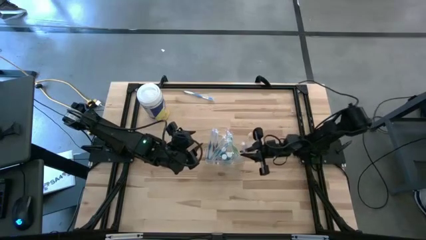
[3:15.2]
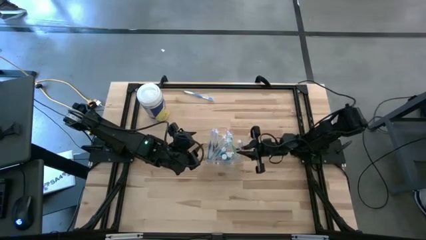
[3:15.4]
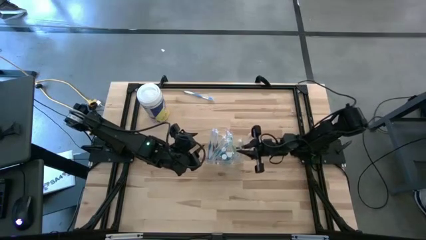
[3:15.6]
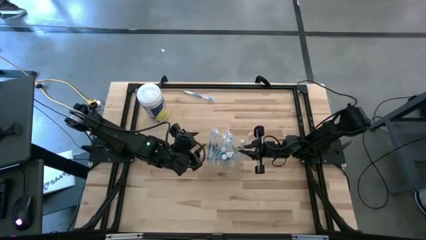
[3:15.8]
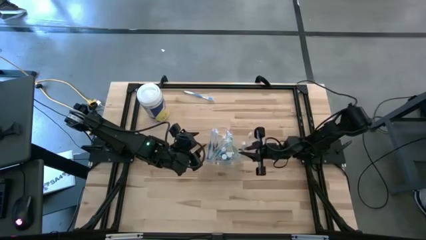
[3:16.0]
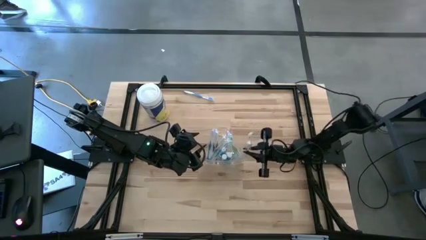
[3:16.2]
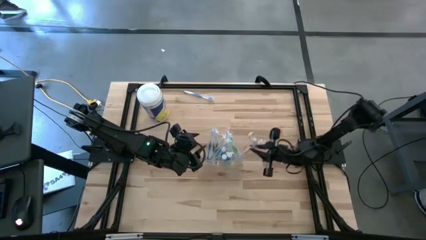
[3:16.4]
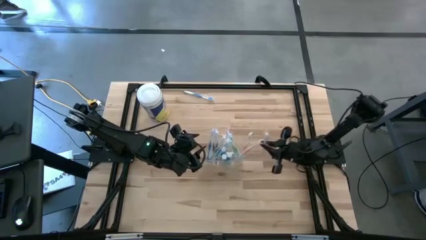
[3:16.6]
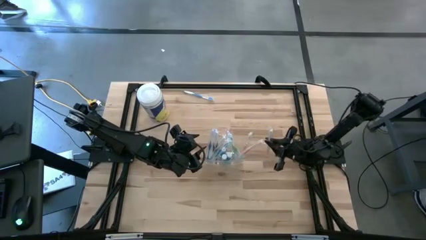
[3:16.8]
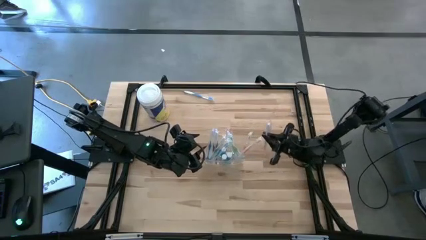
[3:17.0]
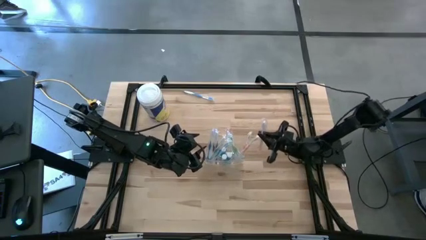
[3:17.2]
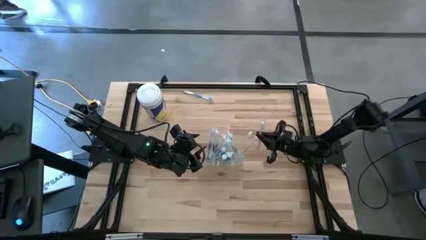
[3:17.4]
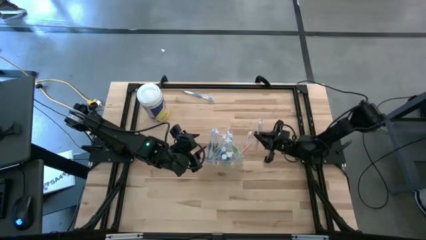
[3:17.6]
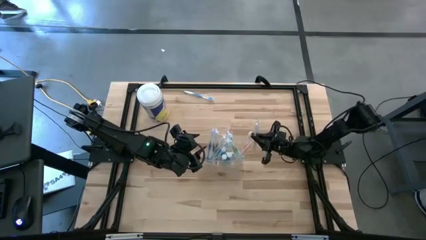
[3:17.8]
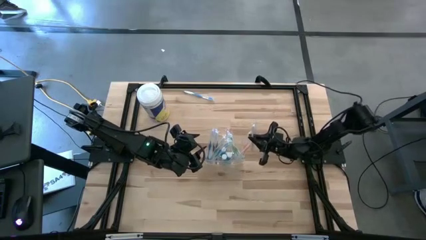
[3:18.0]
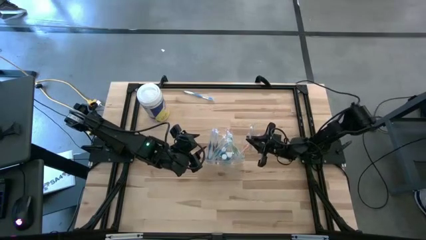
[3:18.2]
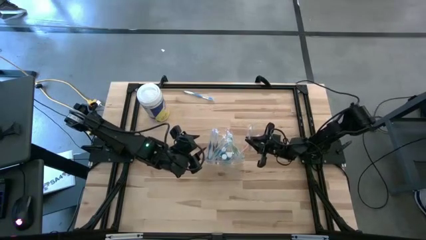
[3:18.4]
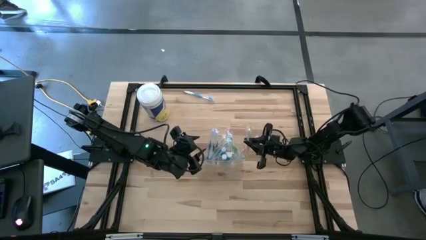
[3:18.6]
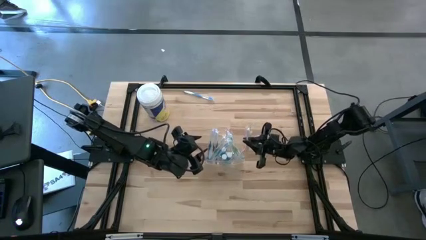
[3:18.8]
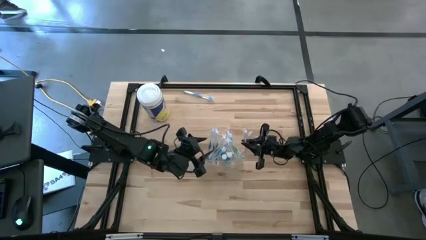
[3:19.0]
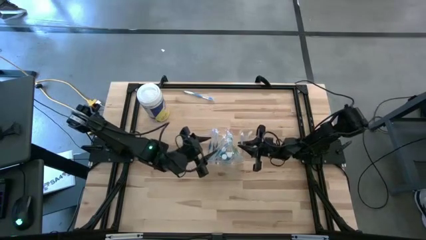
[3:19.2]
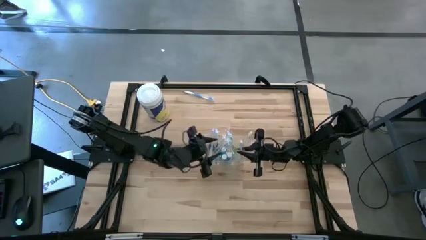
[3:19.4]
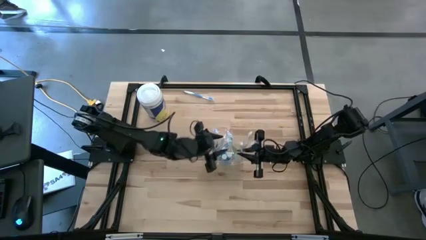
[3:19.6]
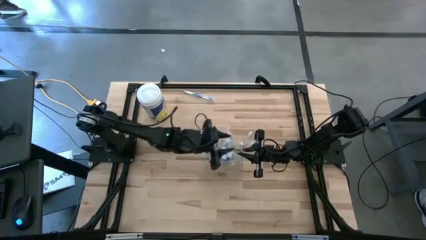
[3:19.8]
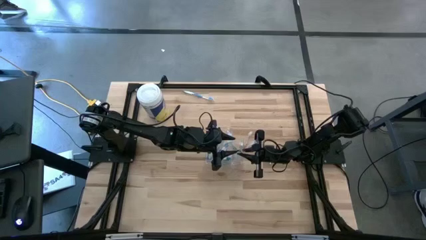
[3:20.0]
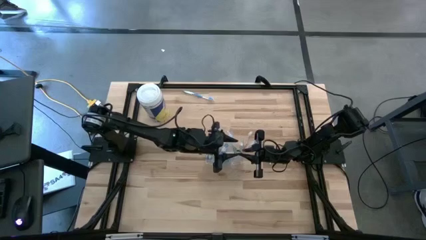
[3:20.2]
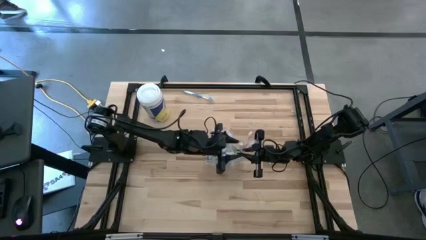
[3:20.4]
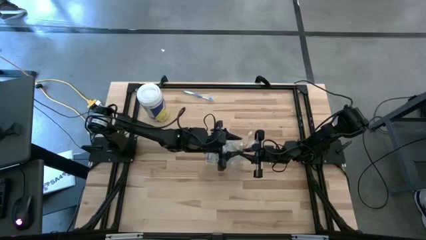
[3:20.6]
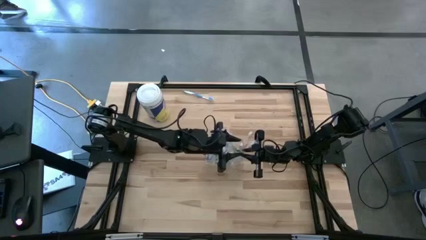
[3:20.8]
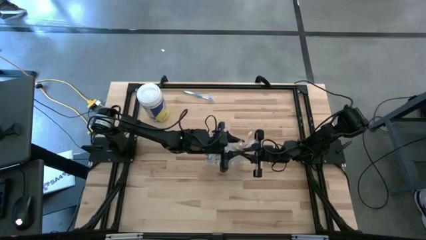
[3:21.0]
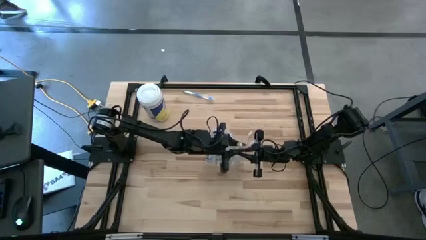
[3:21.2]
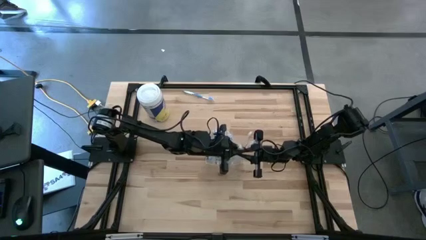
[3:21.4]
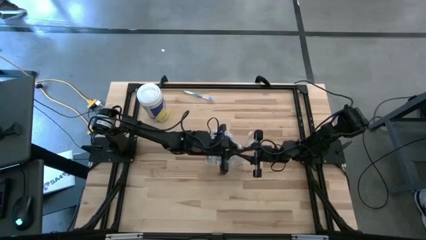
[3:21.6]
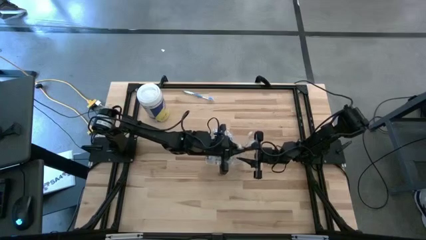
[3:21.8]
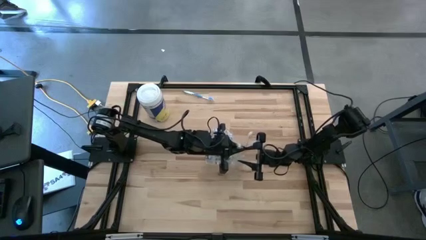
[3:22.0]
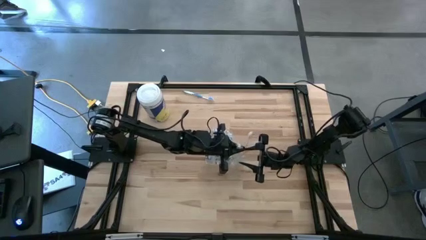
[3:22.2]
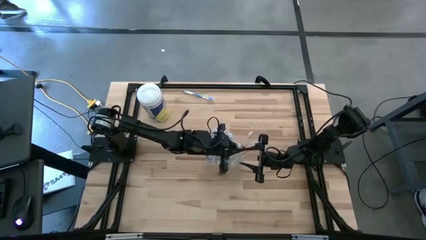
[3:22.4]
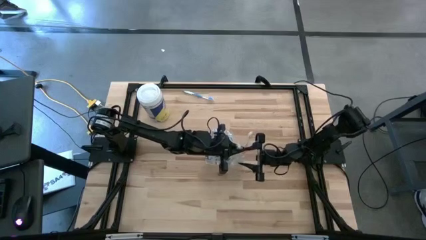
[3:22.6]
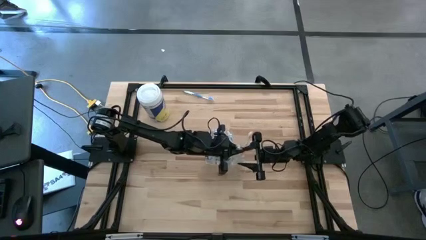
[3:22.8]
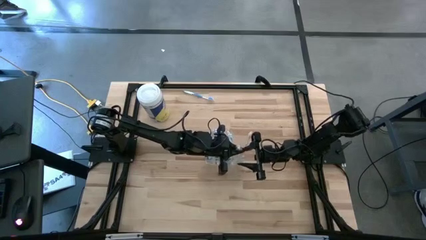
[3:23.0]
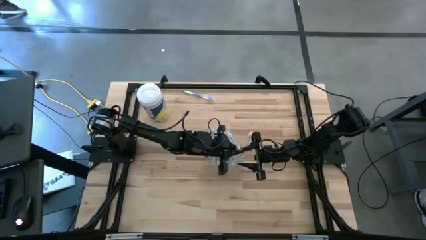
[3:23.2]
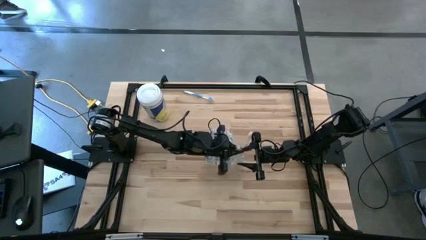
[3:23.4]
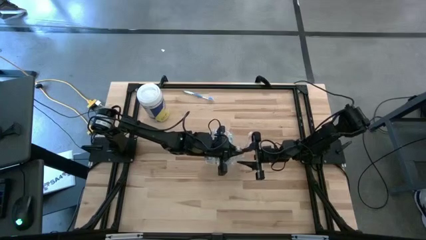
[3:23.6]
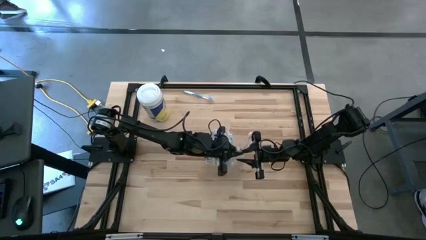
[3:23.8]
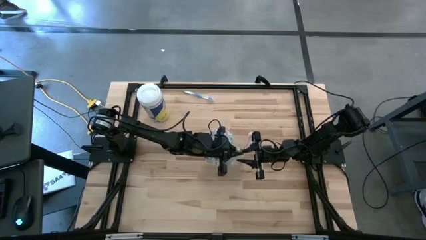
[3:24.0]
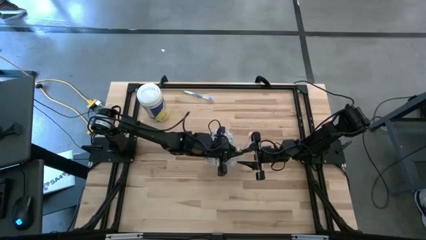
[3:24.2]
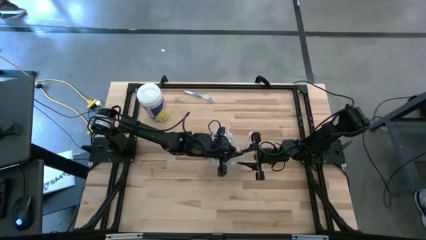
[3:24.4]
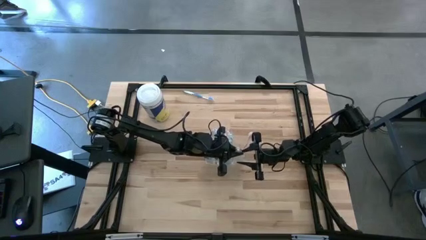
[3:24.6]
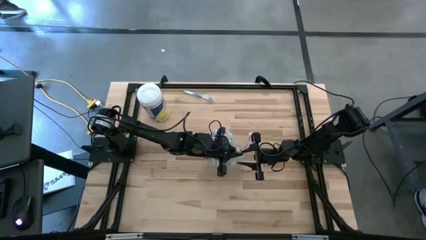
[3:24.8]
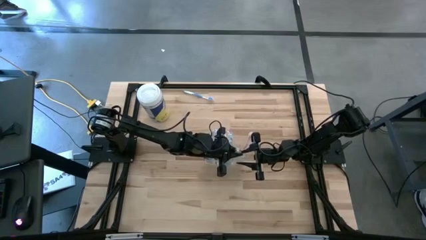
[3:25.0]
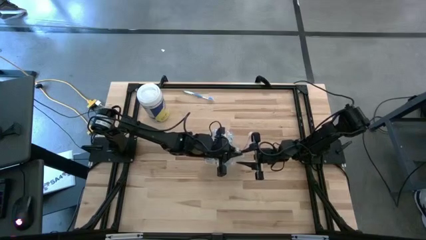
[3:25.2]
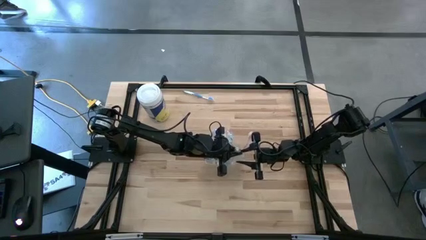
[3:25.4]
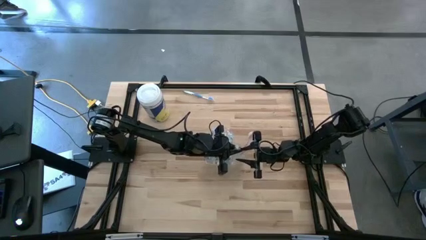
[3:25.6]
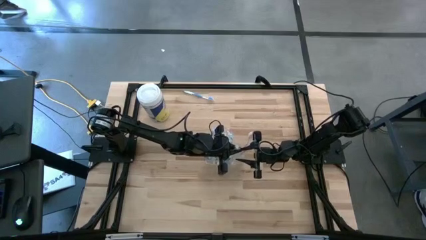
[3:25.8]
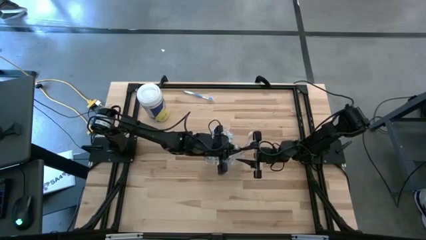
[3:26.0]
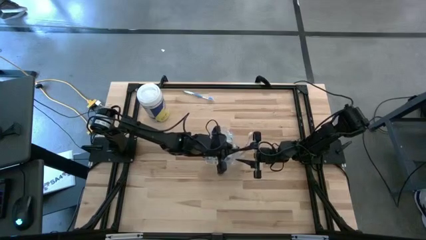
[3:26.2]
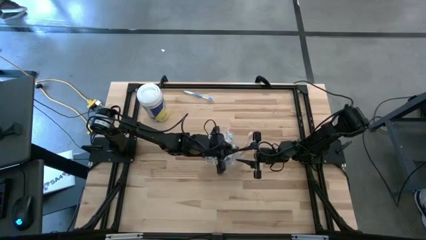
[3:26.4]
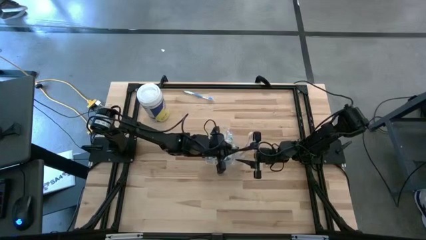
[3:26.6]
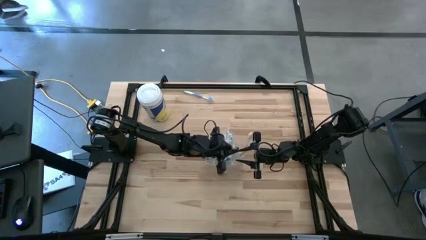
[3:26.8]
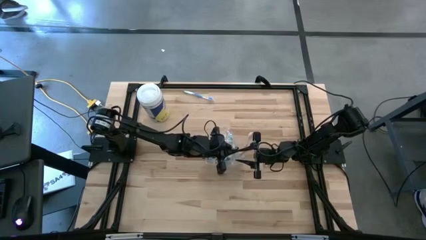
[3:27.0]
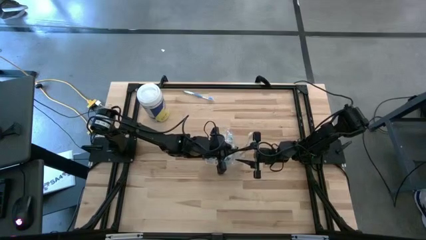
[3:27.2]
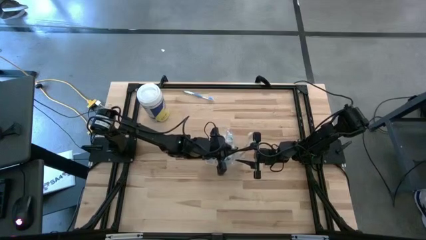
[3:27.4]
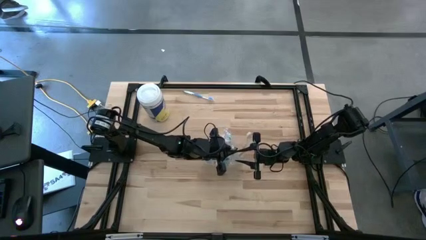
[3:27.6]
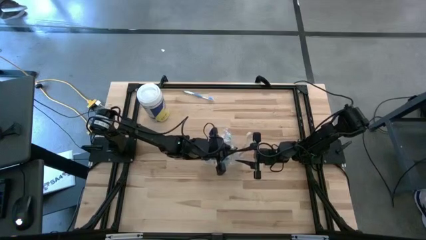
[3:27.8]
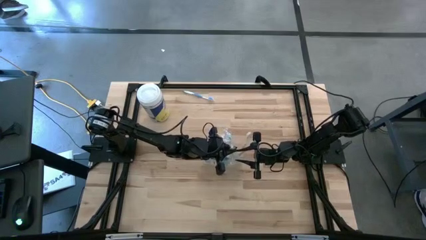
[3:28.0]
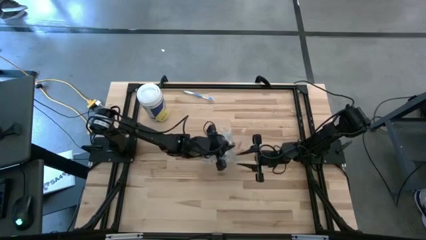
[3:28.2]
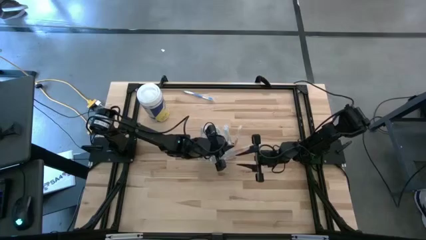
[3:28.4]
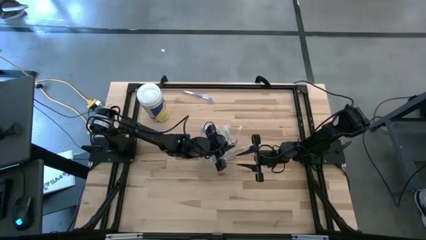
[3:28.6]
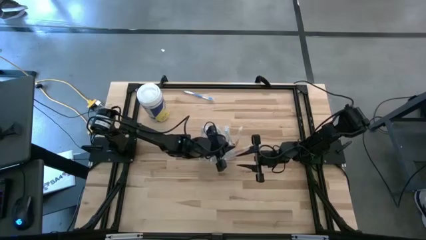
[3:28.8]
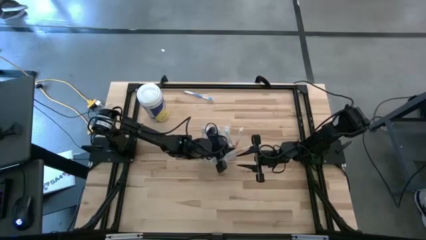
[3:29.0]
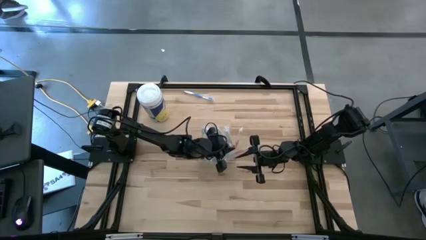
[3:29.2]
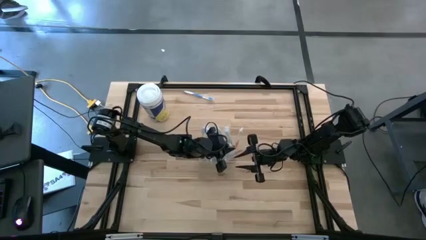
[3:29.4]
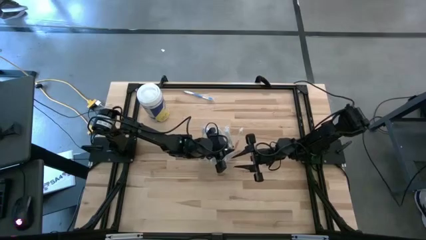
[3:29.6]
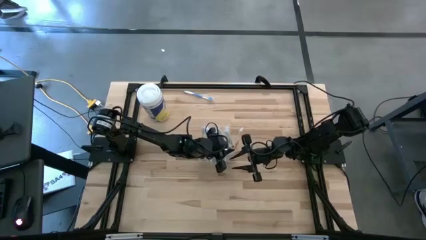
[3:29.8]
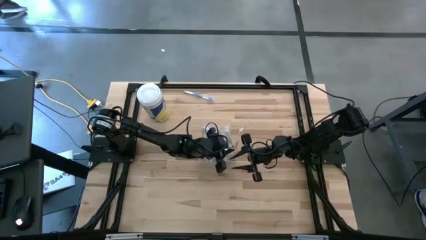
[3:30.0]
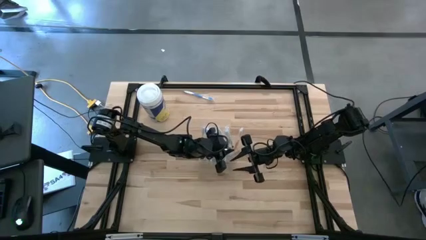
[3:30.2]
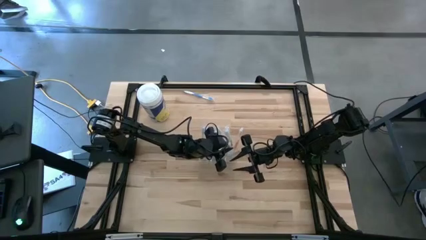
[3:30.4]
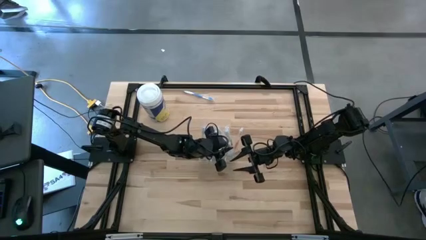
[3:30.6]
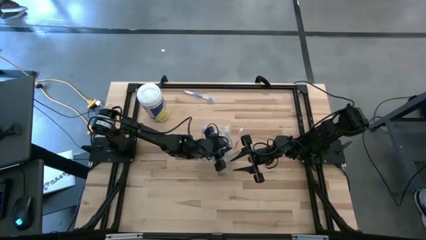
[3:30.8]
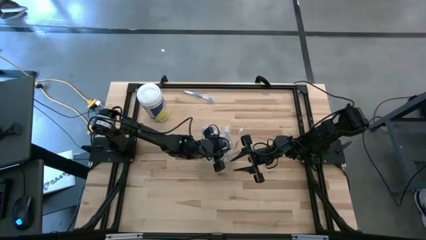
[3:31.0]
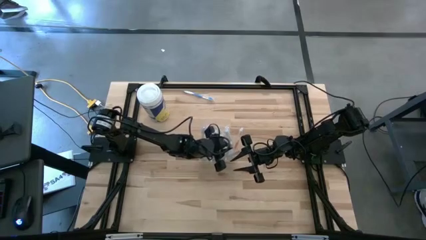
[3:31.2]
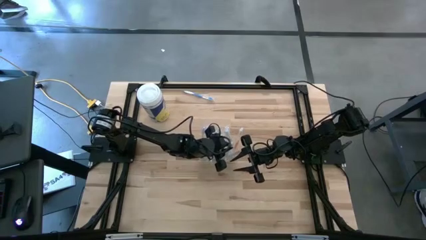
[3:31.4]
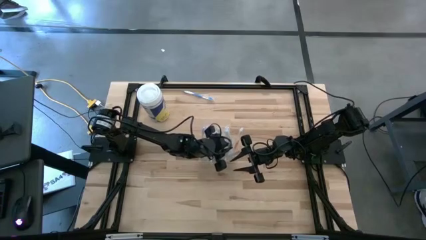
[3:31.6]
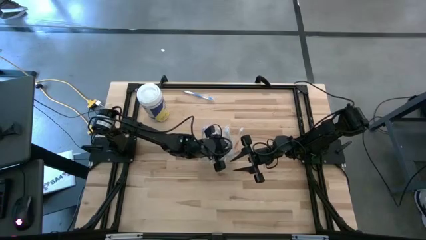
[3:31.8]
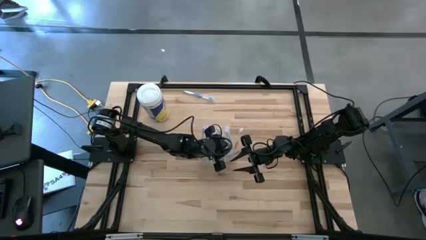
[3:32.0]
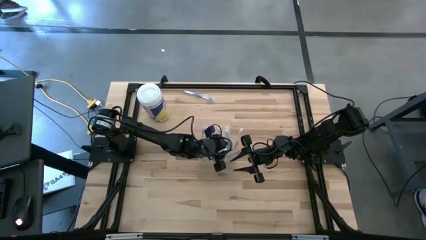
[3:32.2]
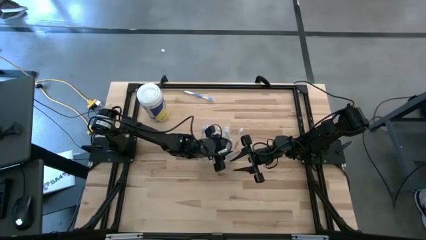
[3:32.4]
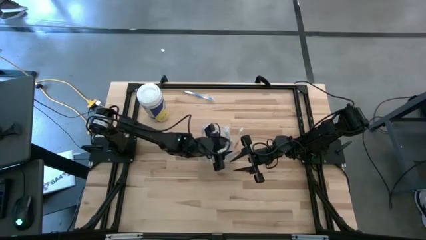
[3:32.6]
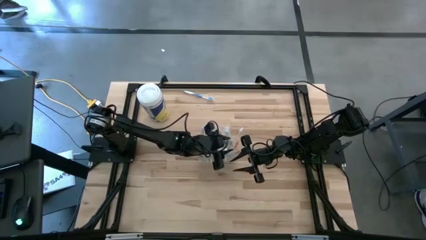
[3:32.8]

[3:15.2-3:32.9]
Task: Pick & Place toothbrushing station
Put the orange toothbrush into the transparent organizer
